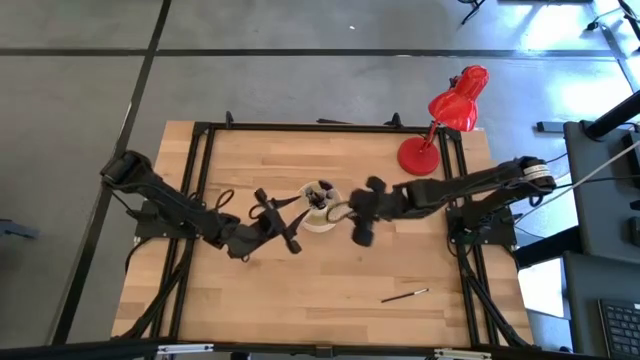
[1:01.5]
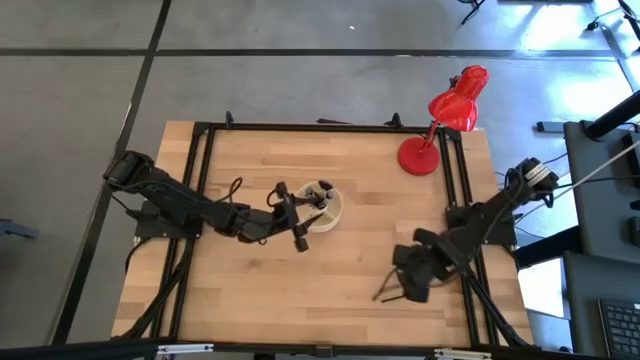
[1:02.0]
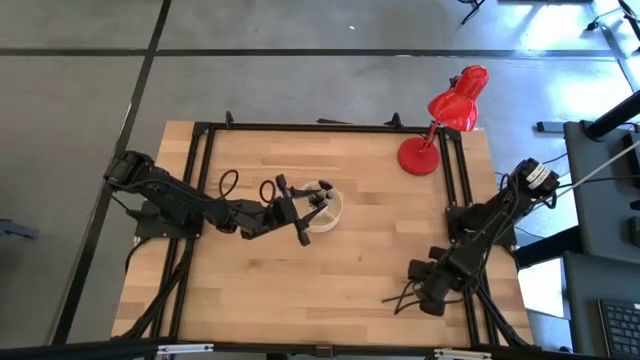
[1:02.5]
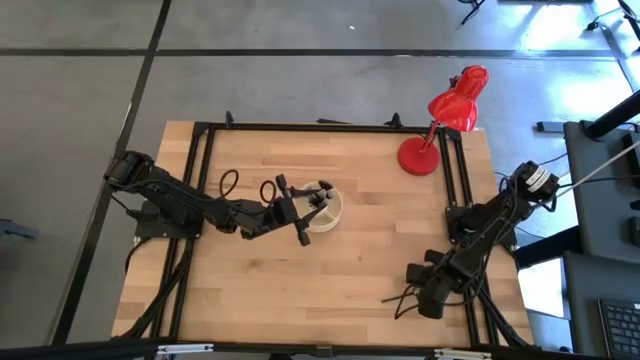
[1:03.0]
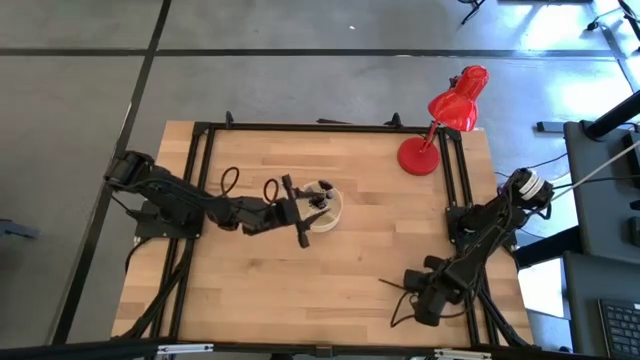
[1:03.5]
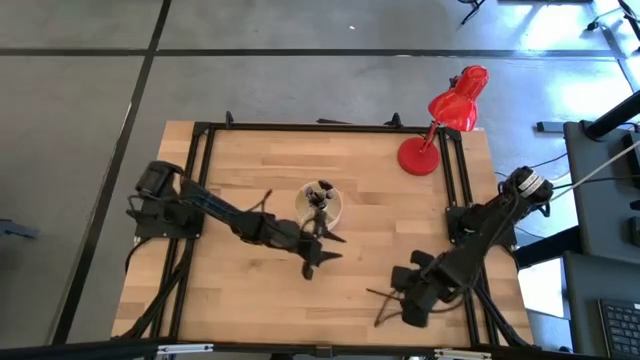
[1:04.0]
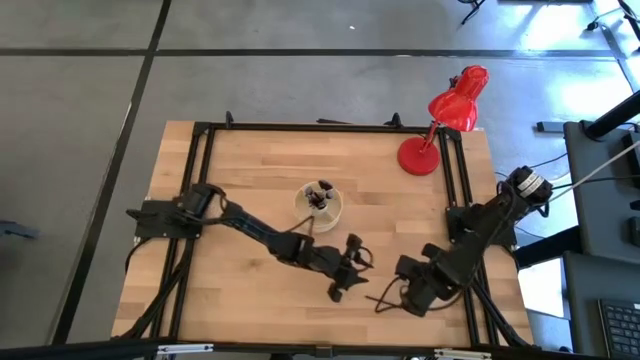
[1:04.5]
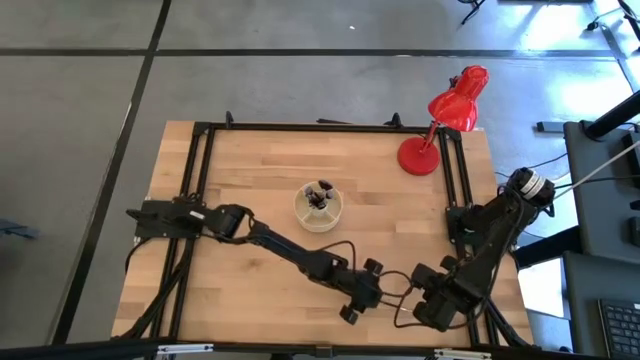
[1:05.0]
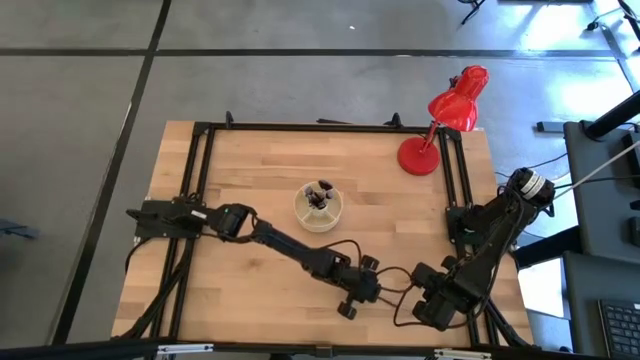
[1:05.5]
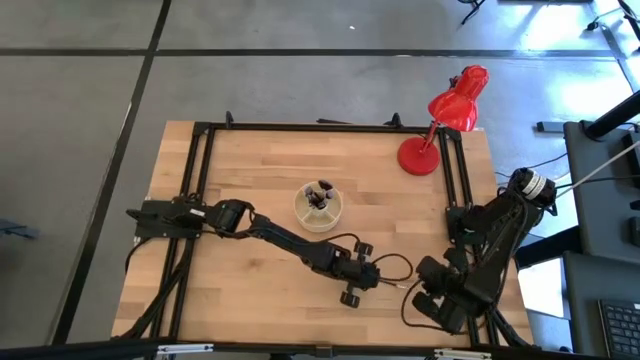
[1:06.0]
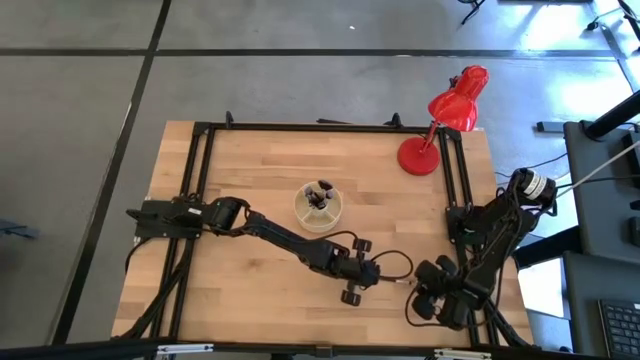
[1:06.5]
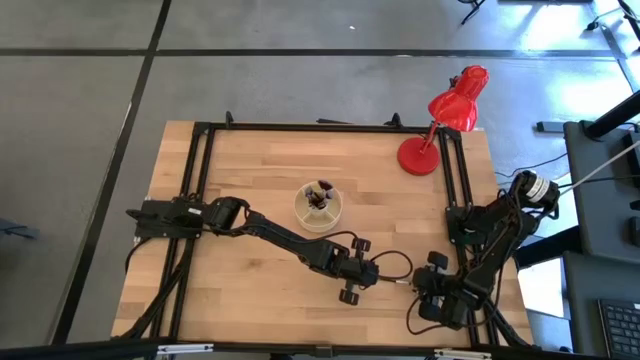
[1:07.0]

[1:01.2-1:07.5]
Task: Put items in baskets/containers
Put the eyeshadow brush into the white organizer

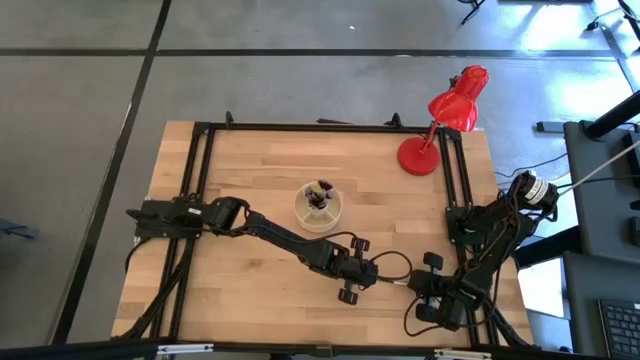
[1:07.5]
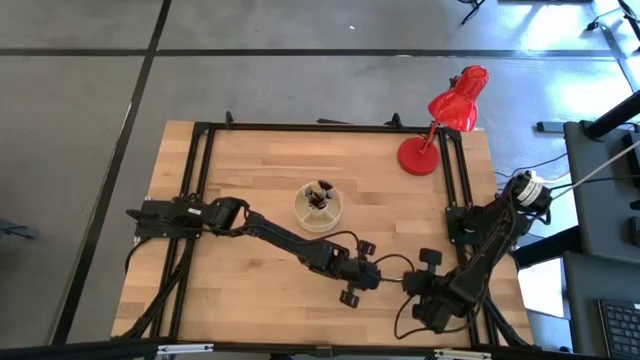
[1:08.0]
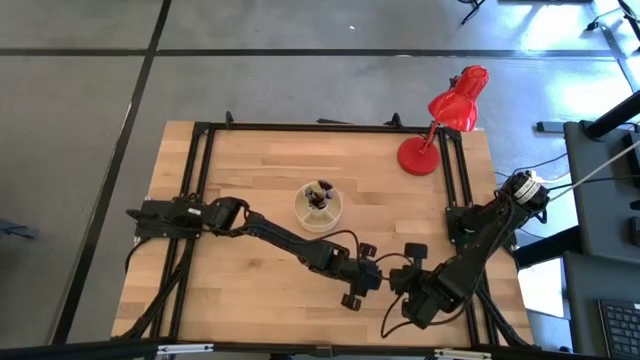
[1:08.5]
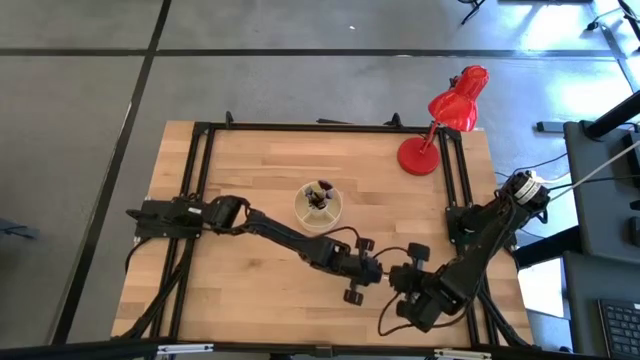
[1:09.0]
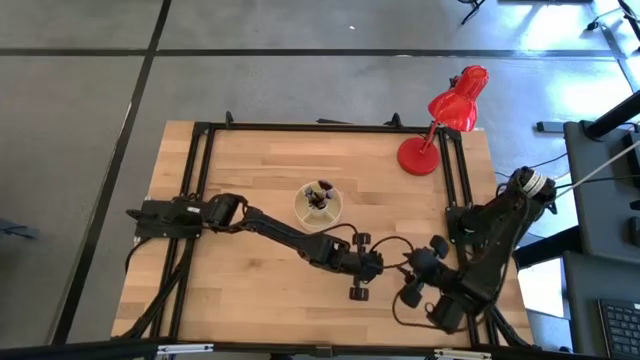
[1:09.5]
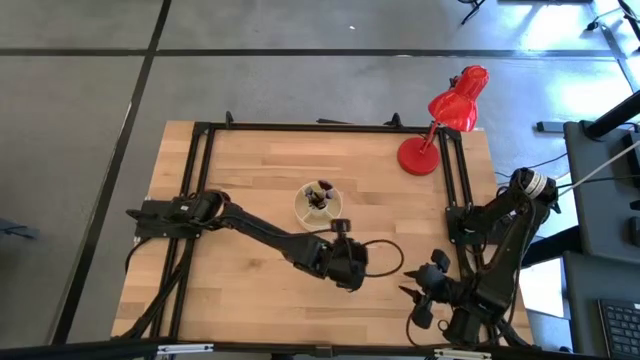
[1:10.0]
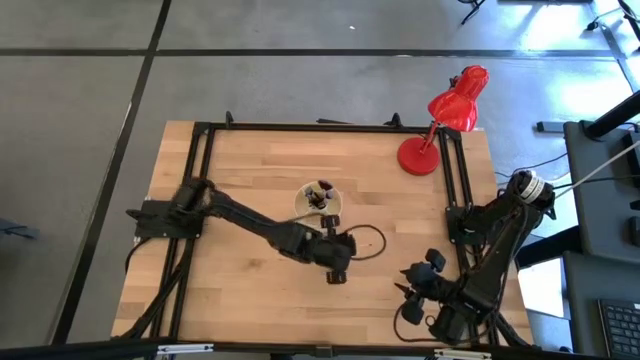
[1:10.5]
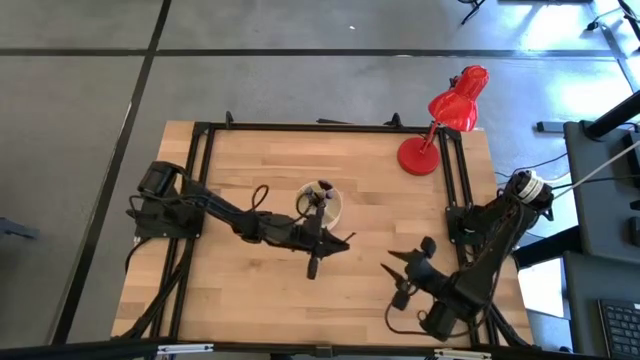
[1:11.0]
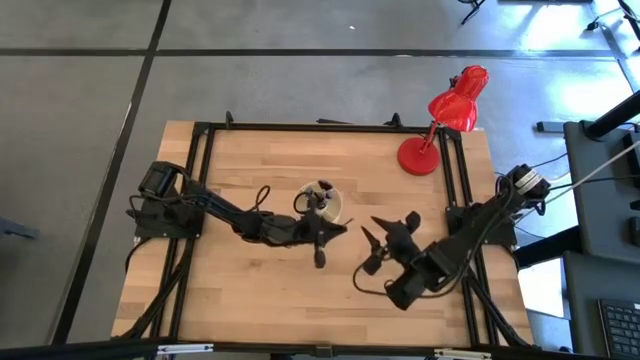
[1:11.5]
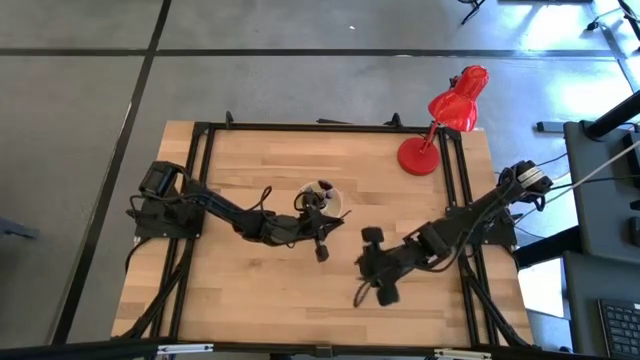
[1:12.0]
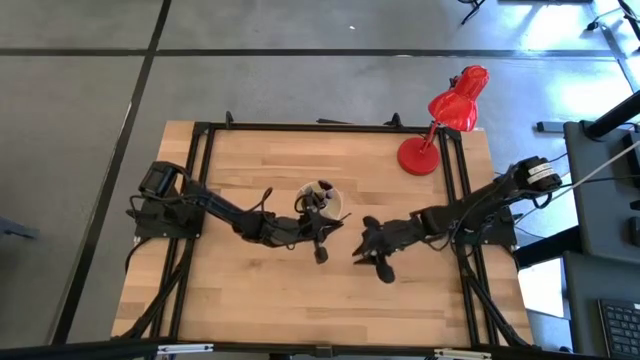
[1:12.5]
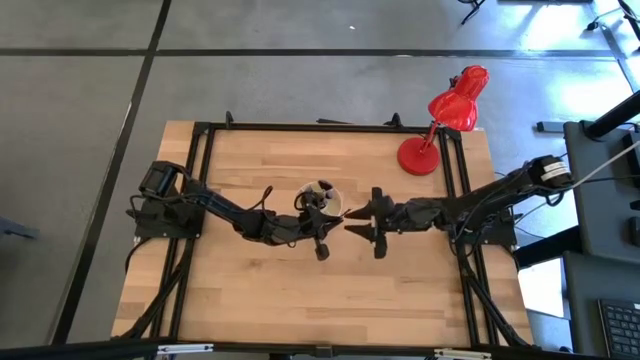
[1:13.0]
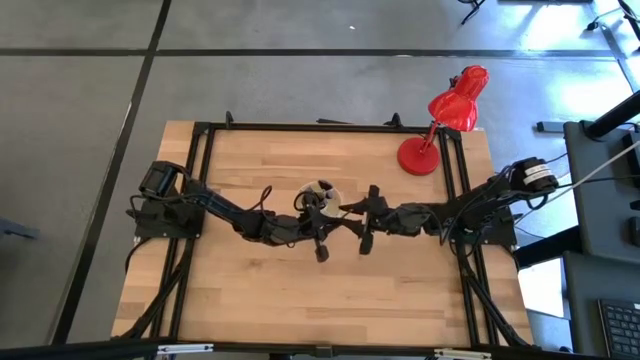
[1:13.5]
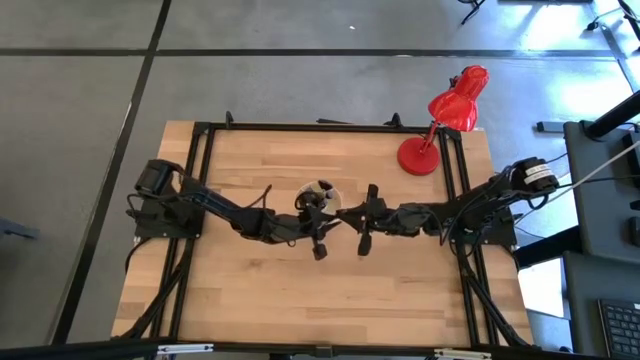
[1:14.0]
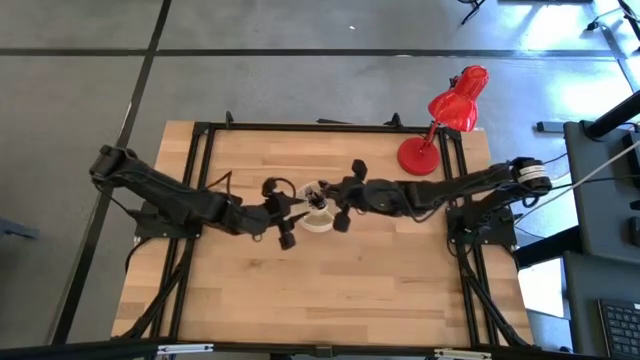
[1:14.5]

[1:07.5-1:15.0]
Put the eyeshadow brush into the white organizer

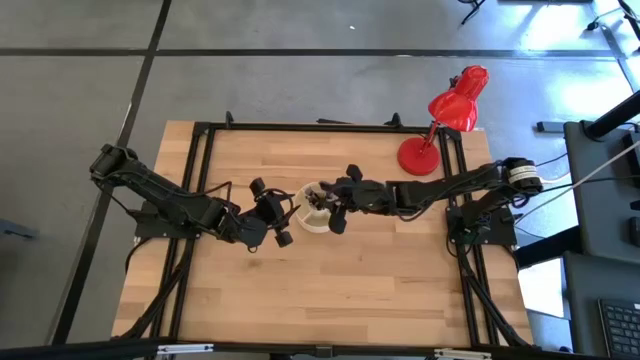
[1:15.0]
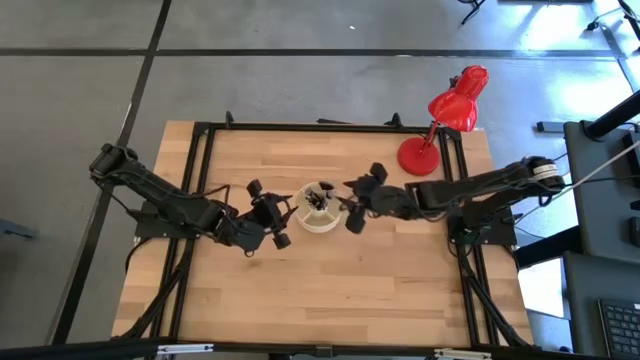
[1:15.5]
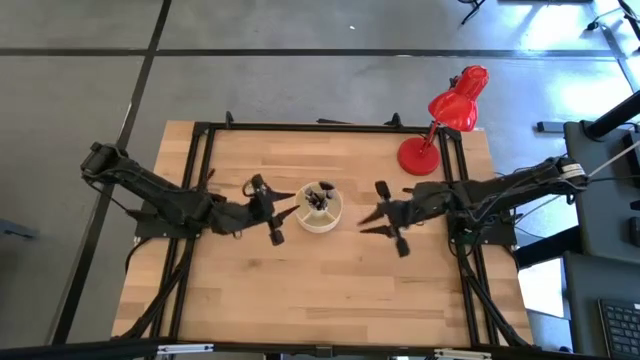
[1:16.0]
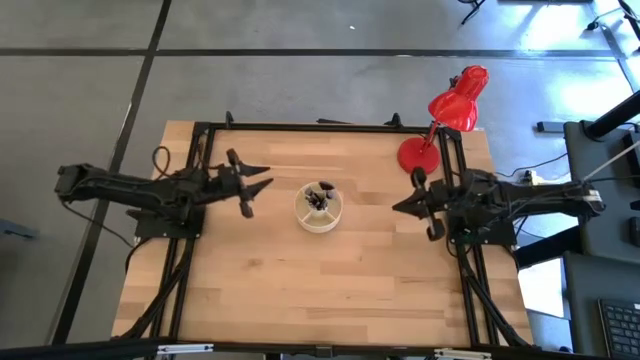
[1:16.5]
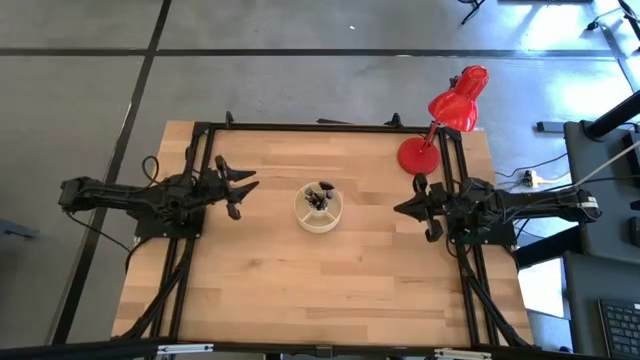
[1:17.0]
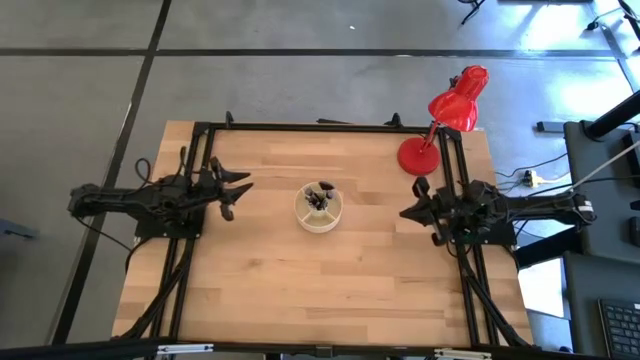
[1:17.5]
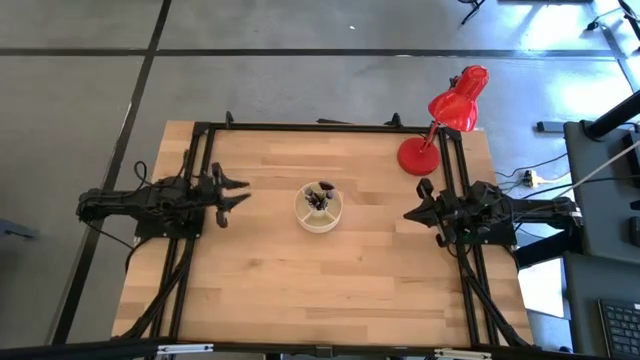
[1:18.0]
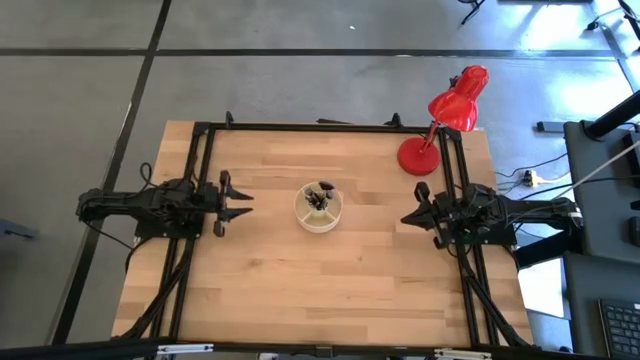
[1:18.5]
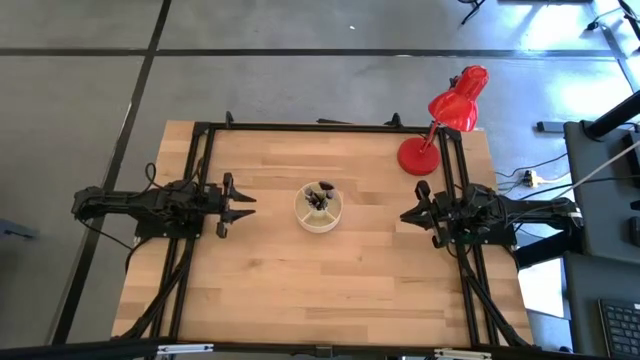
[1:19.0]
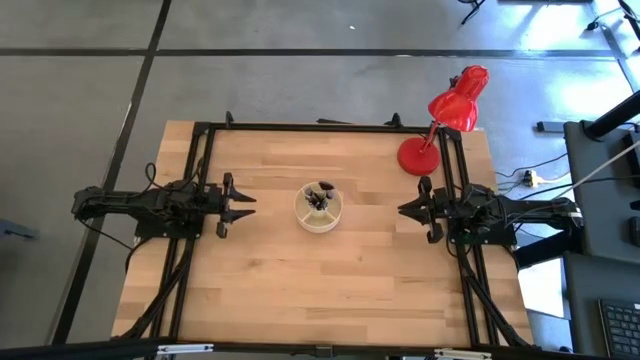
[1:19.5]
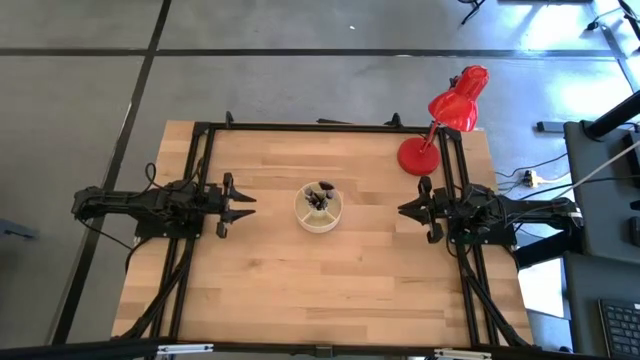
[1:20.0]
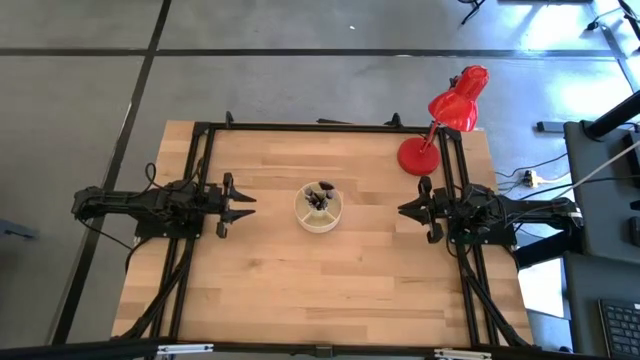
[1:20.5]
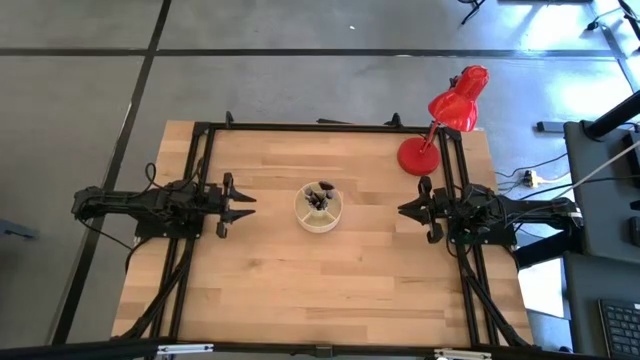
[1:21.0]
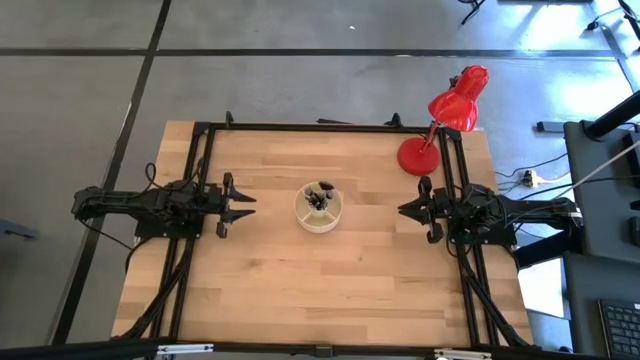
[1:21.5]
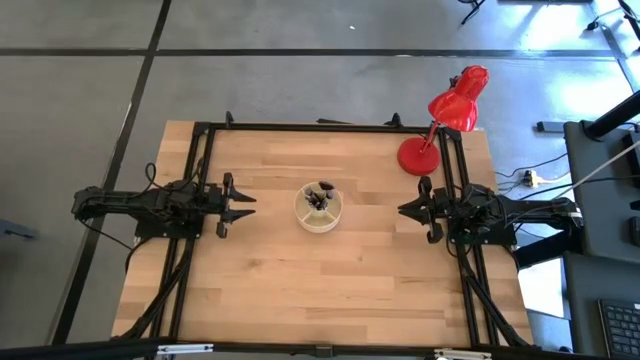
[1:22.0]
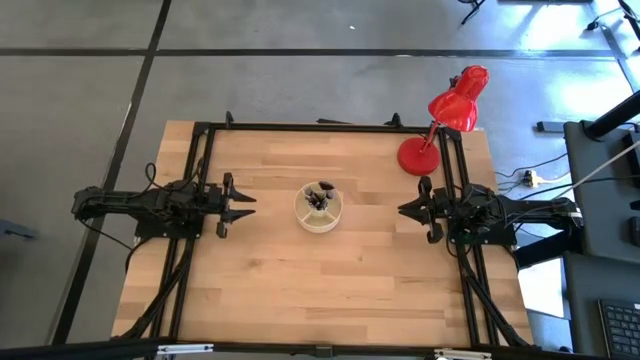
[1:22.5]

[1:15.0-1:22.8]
Return to Home Position
